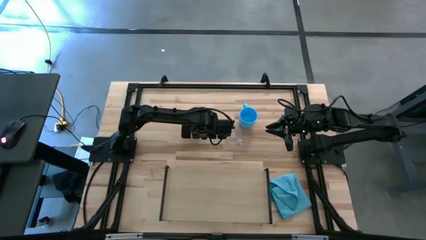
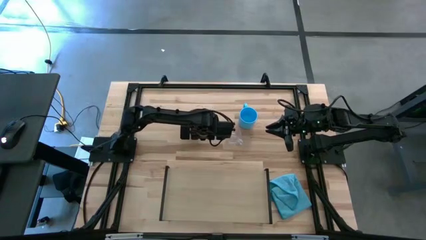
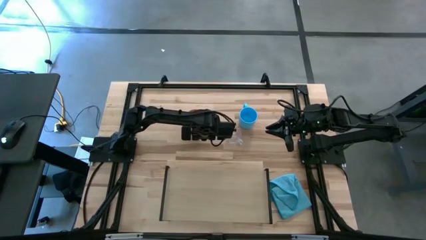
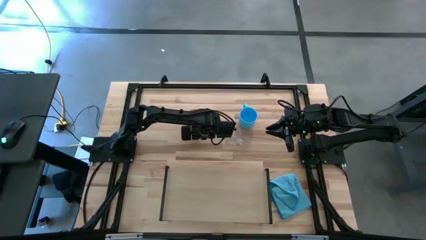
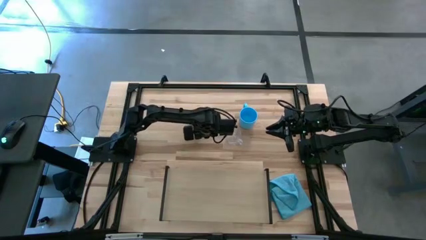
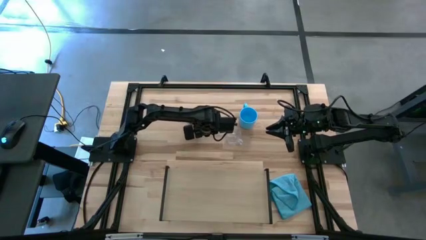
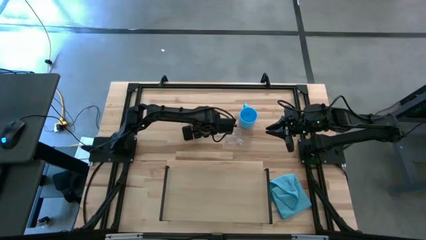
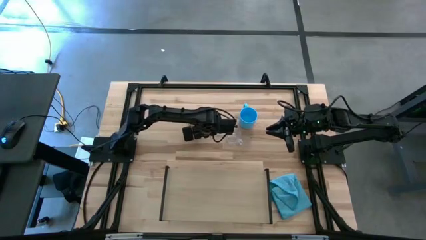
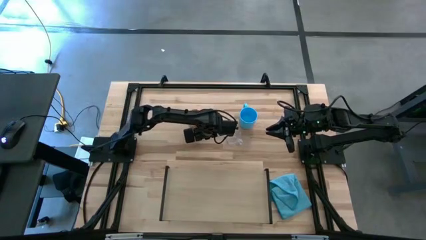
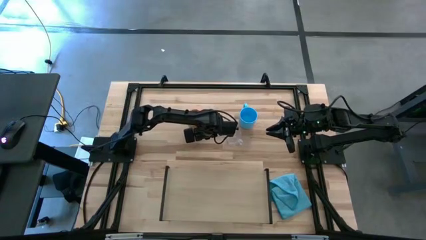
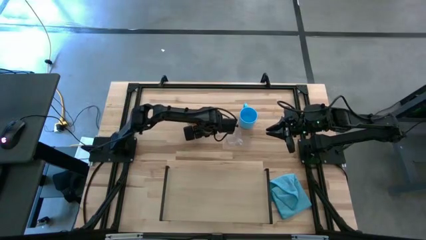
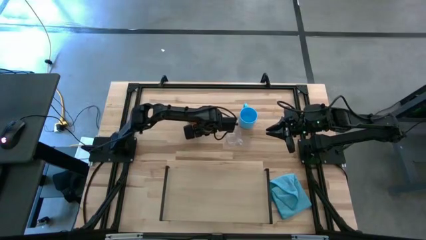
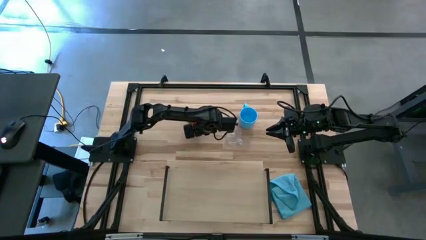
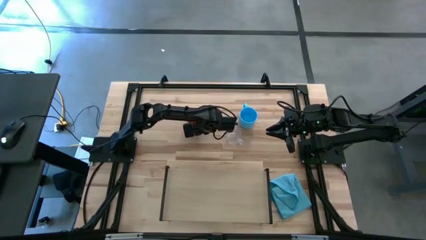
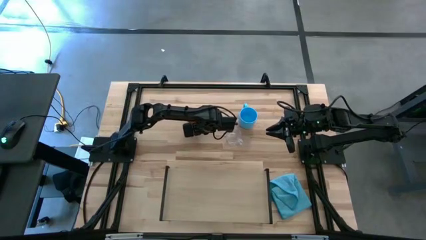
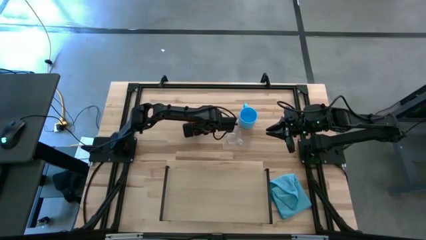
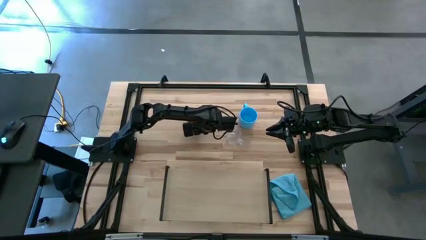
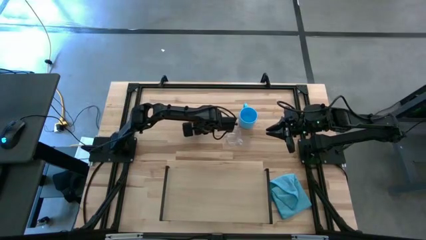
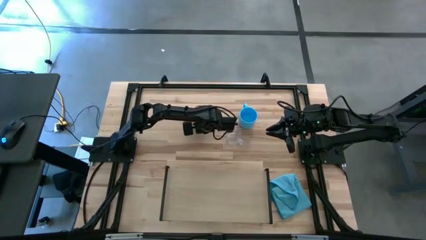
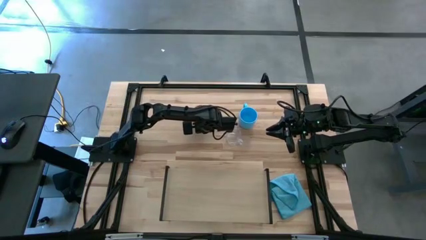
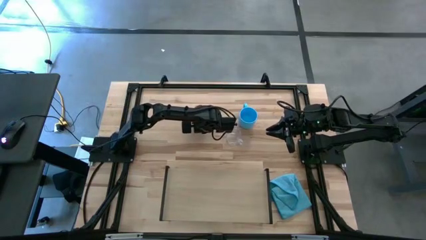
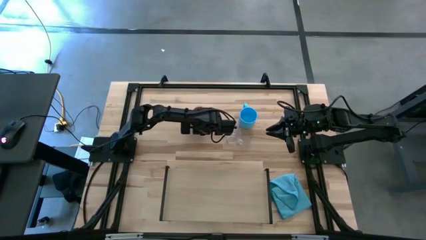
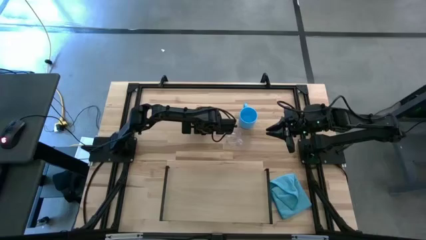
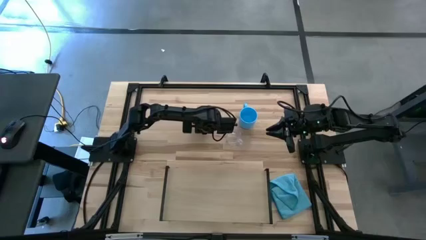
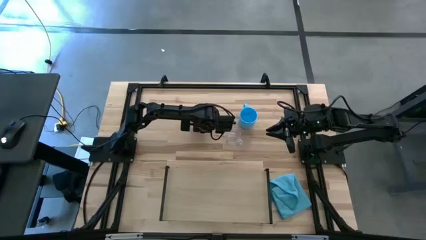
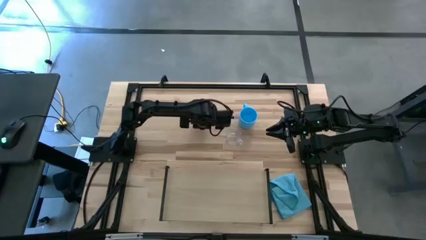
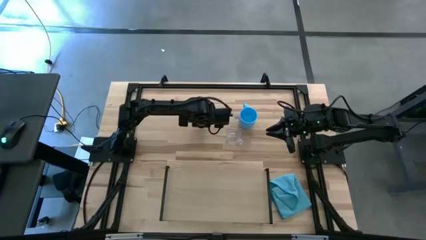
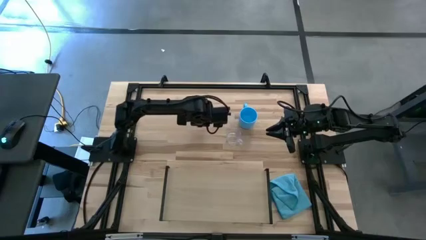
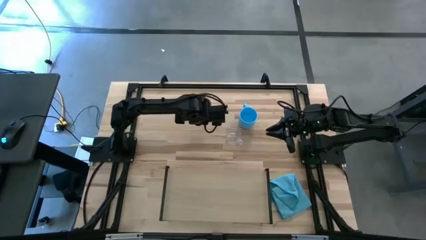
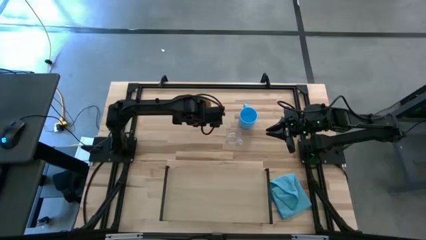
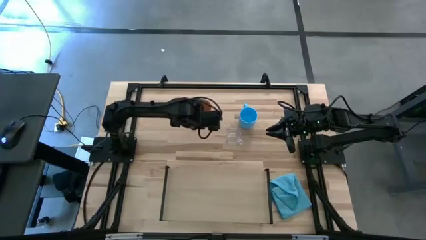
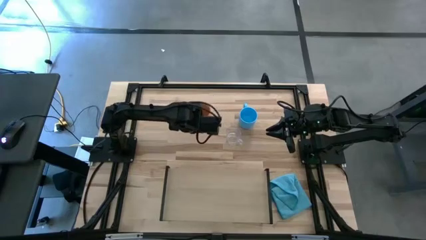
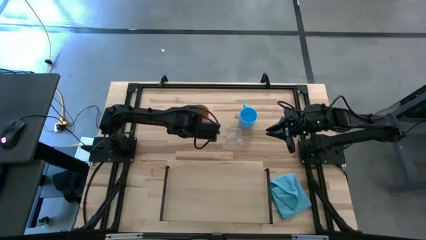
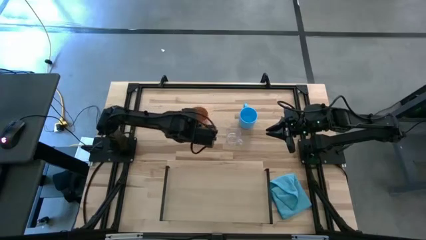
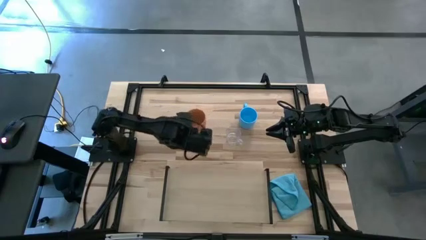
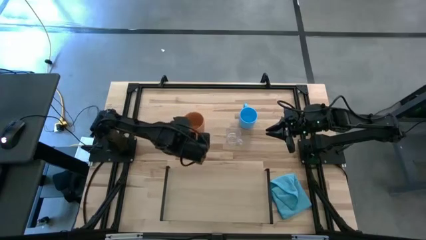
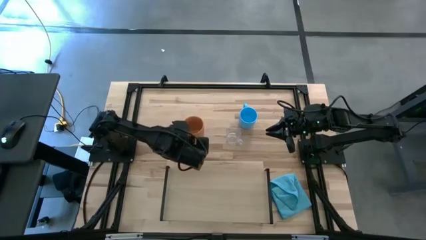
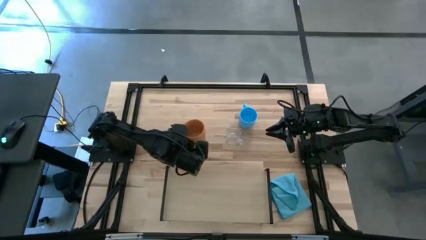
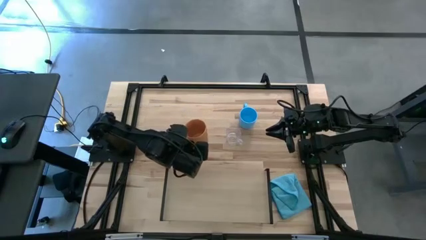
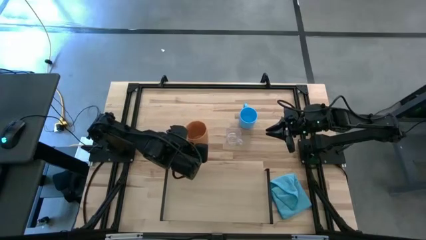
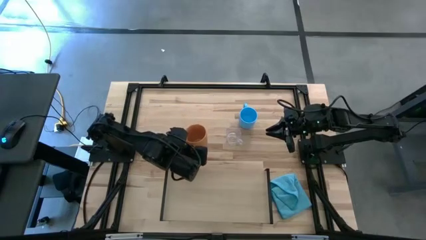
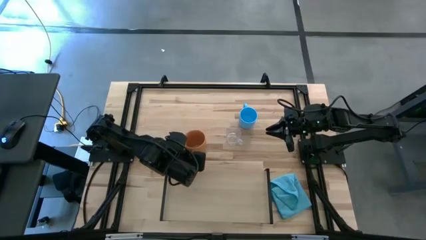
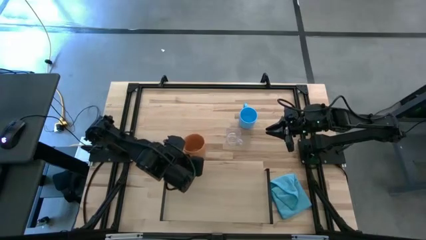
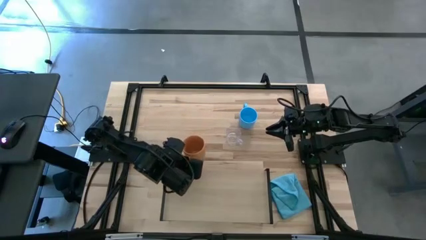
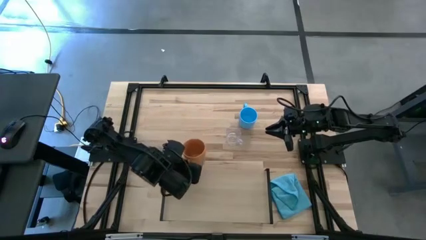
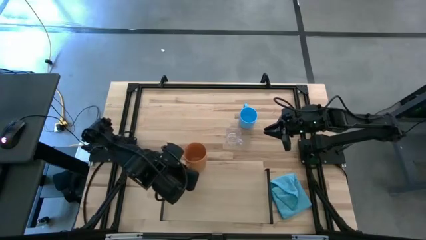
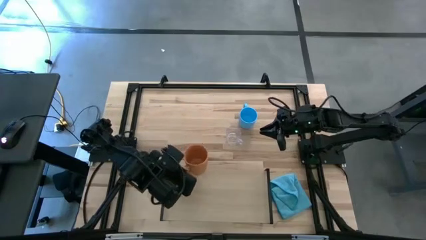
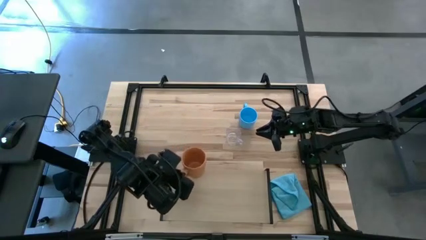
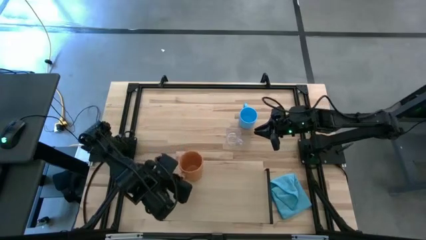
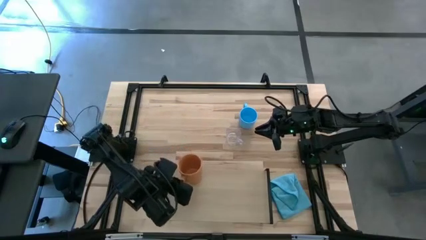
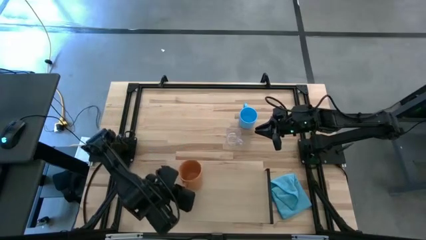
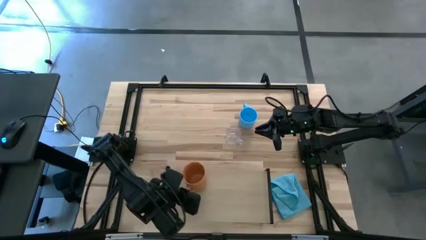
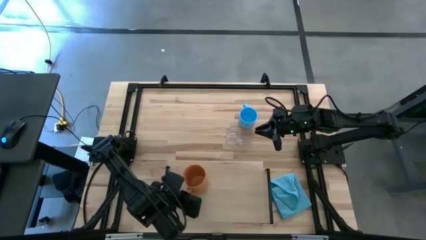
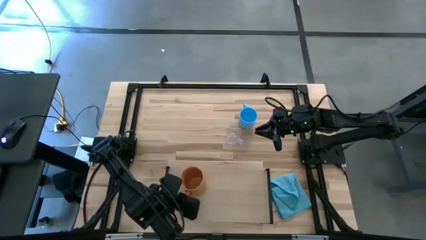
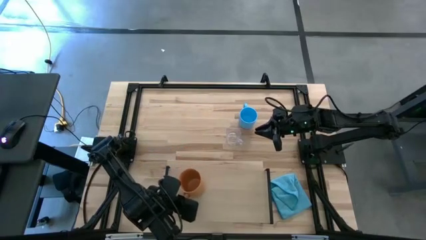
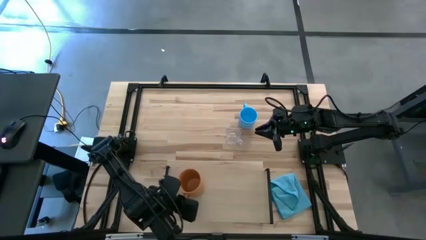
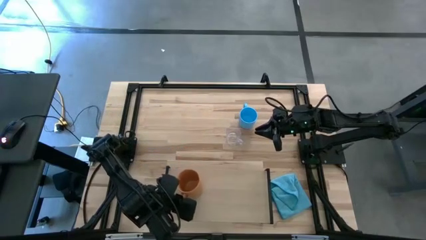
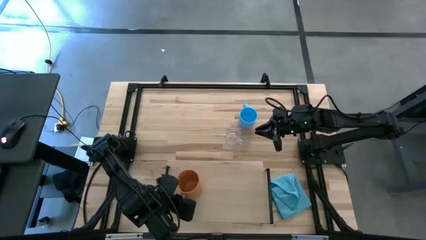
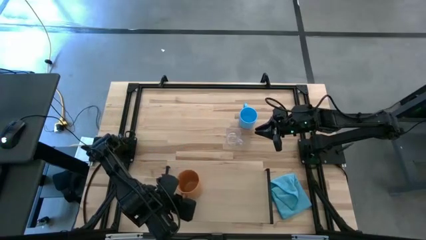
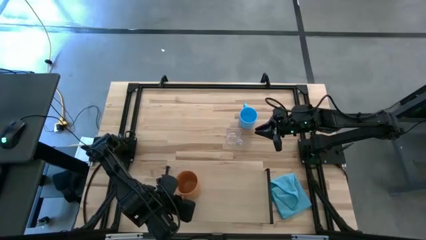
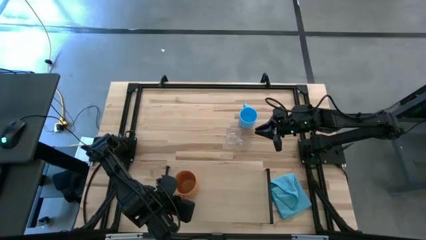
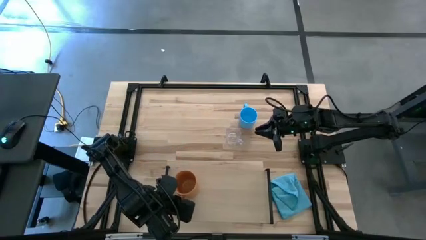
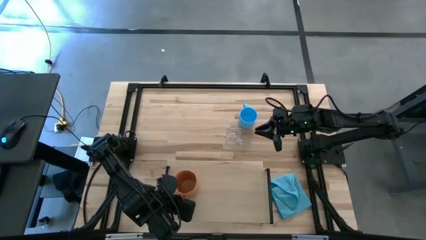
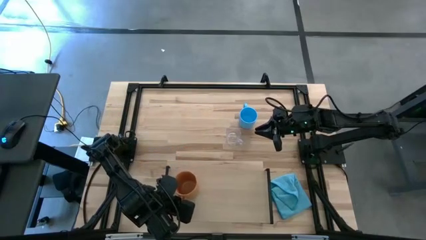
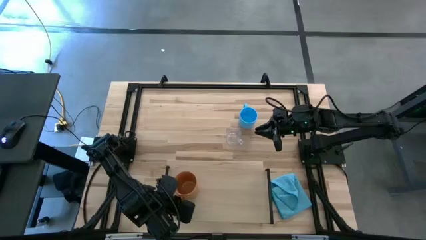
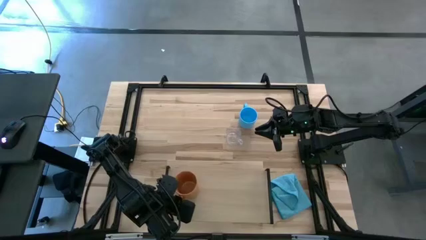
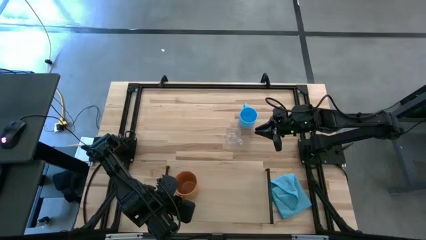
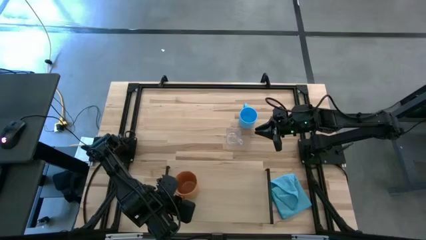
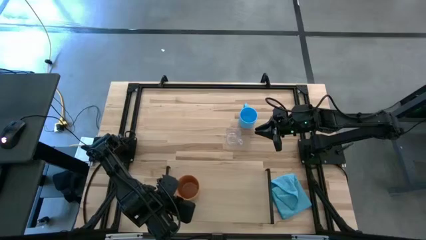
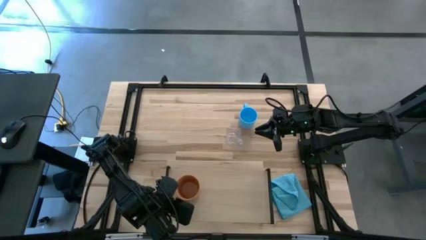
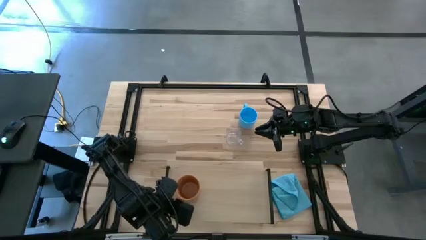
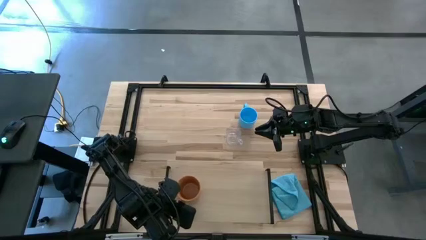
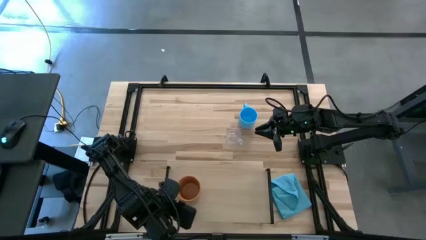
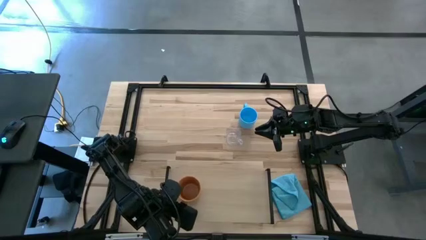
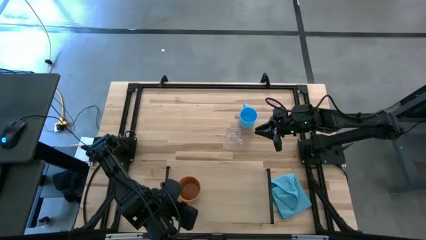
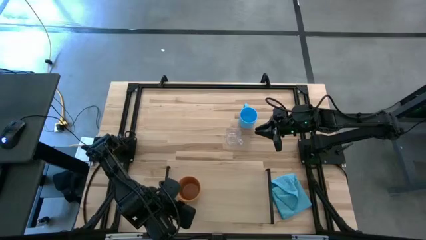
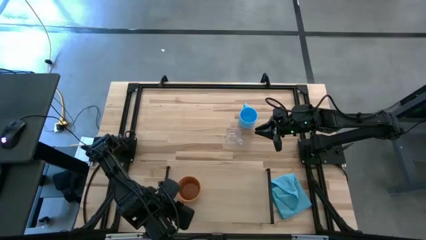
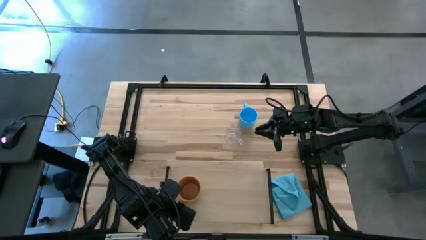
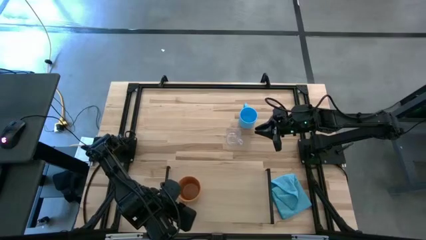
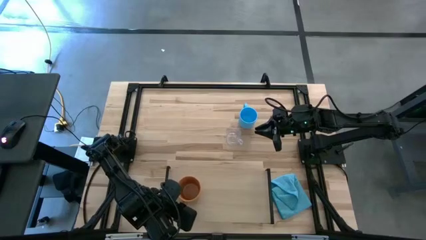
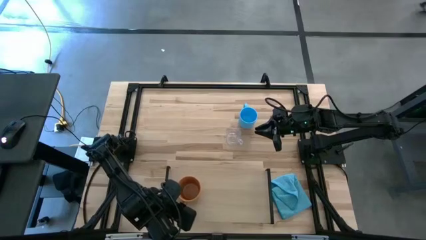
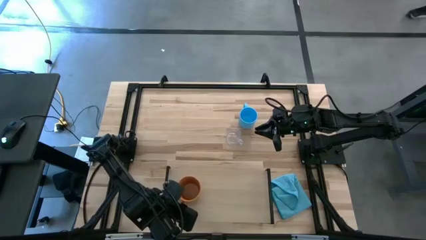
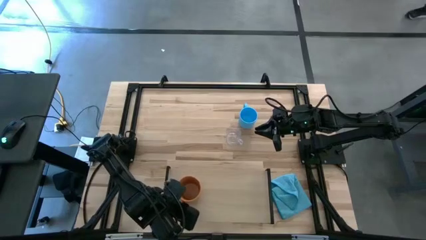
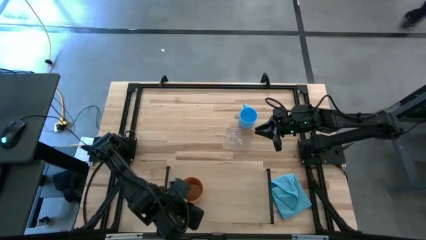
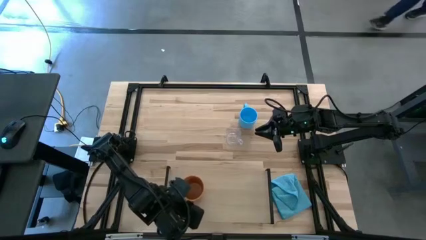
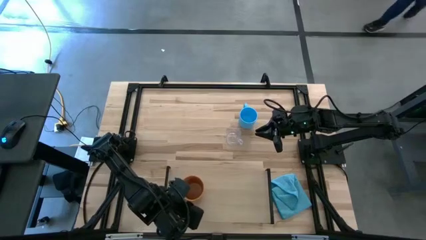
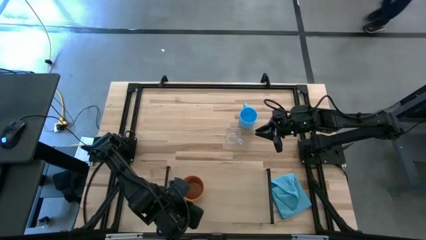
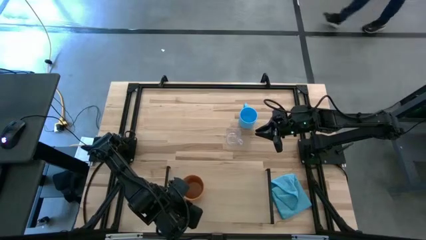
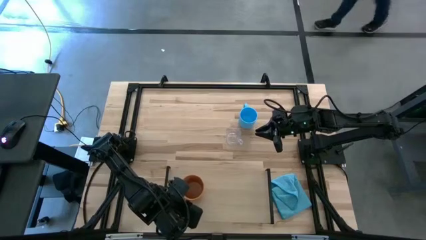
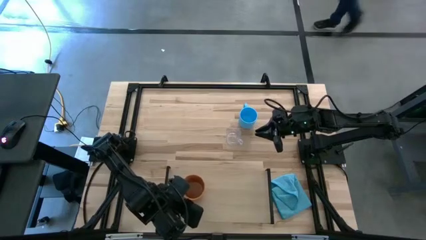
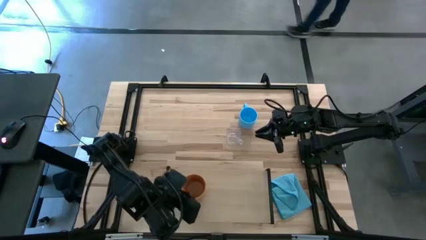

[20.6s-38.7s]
Task: Stack small to large cups/mugs on shelf
Put the orange mug on the shelf
